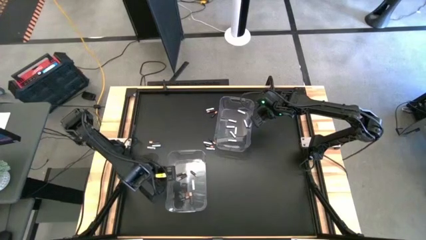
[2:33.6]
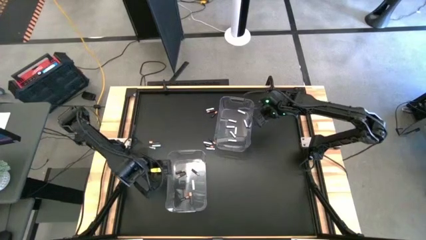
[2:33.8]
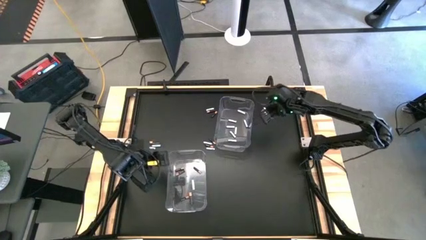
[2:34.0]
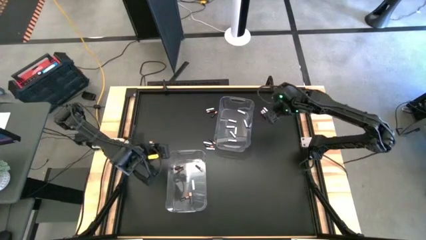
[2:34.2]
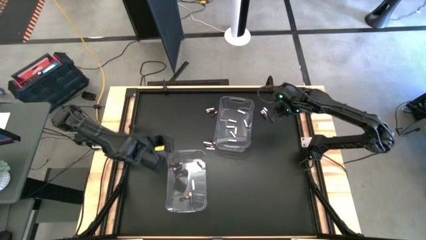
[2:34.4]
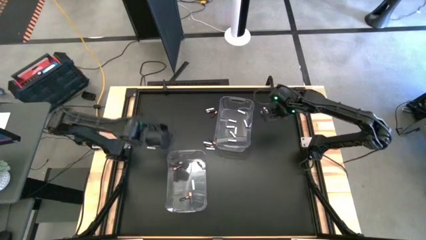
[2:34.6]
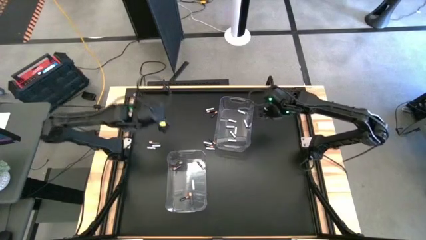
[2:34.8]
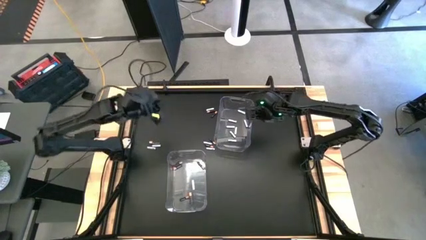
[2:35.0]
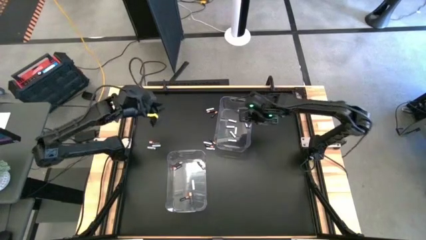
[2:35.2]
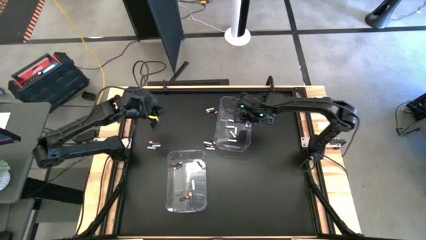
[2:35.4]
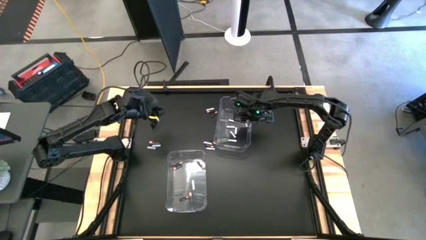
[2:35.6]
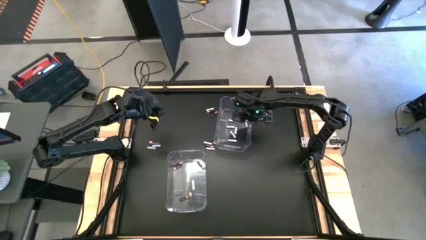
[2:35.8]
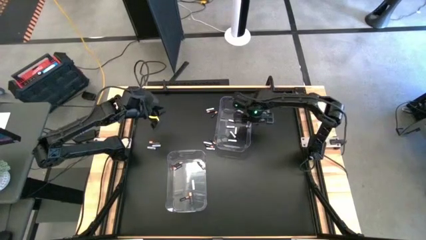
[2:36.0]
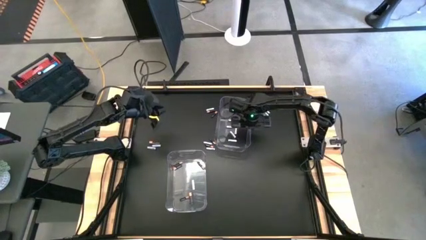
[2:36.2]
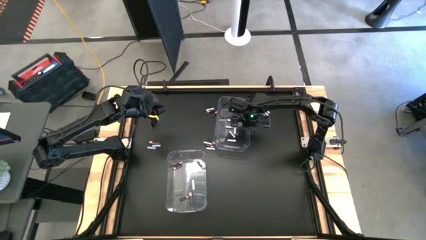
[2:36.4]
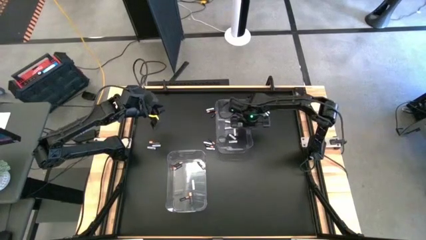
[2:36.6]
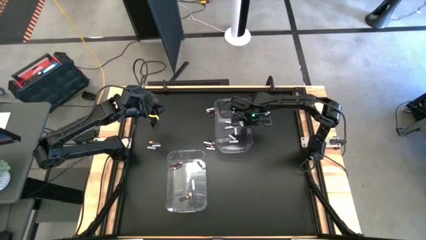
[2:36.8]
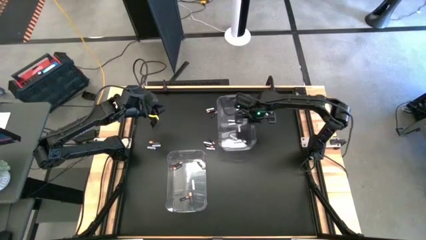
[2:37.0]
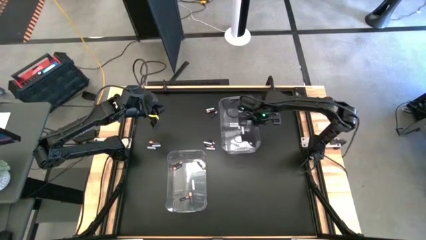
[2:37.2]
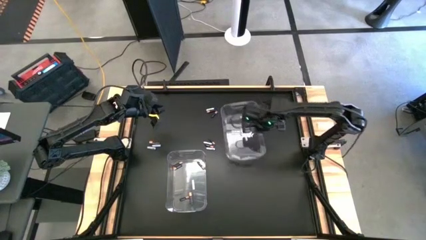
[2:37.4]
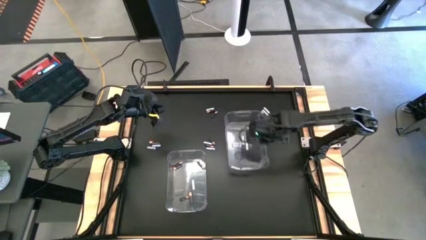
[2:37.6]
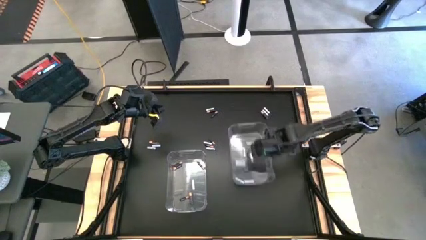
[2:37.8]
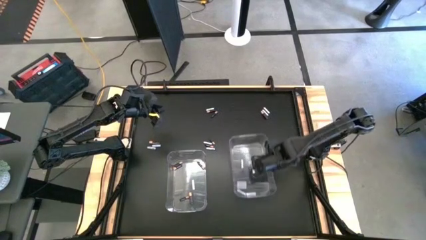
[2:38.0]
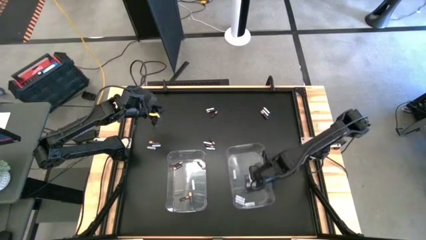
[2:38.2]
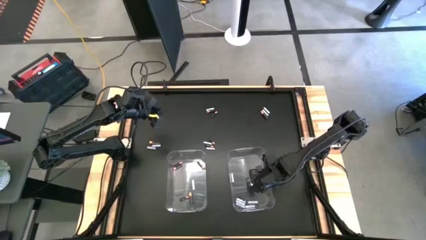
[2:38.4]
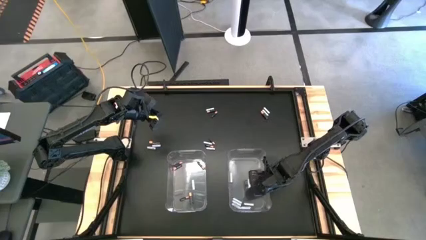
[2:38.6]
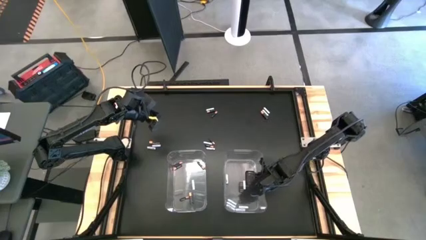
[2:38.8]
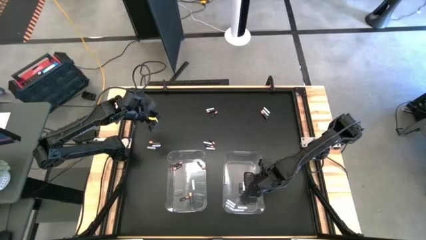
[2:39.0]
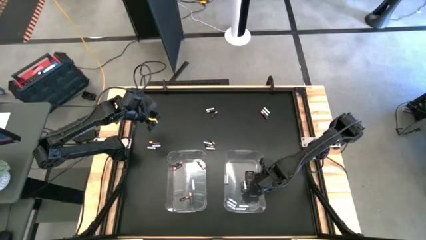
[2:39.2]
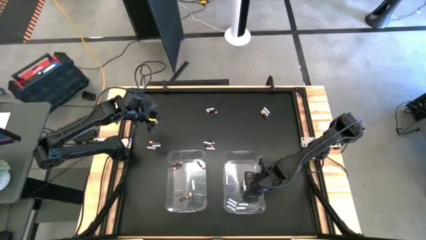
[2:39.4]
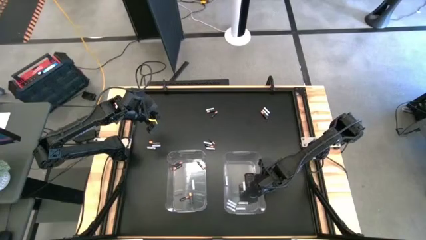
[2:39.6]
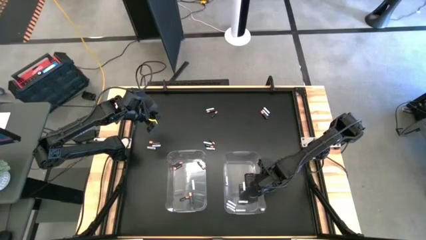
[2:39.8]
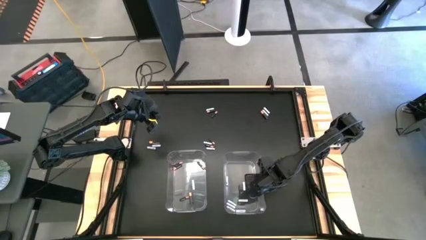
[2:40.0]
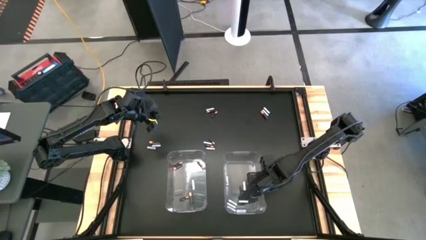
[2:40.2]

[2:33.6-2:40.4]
Task: Sort batteries
Move the top transparent bin to the bottom of the table

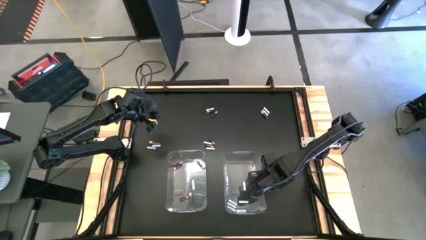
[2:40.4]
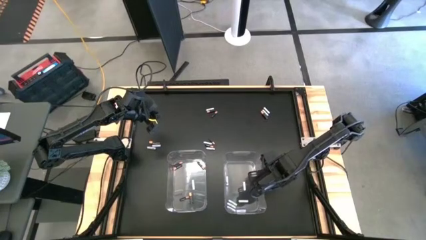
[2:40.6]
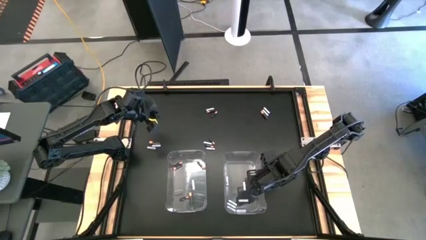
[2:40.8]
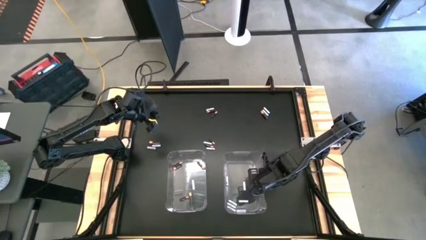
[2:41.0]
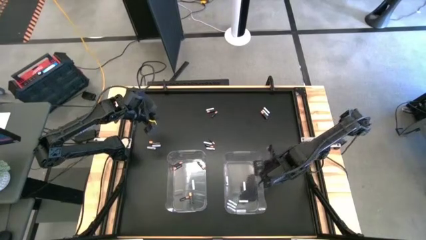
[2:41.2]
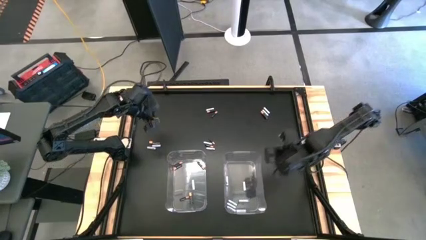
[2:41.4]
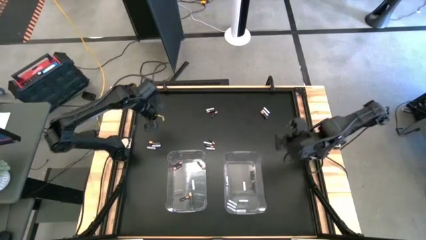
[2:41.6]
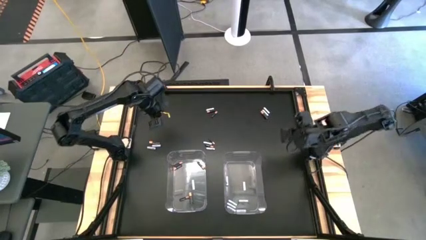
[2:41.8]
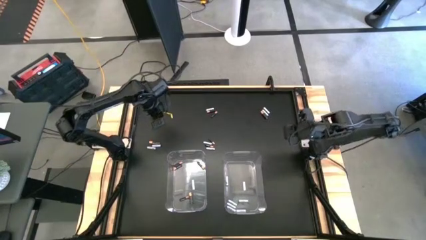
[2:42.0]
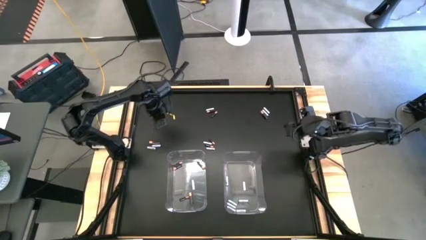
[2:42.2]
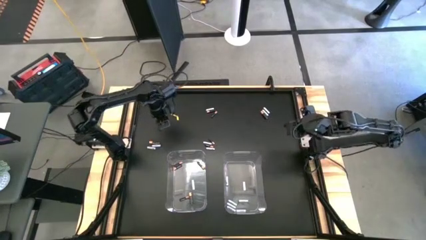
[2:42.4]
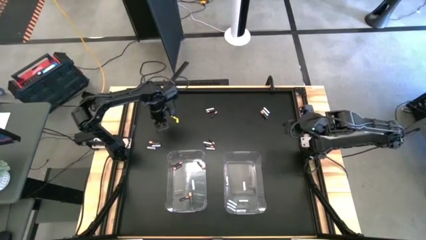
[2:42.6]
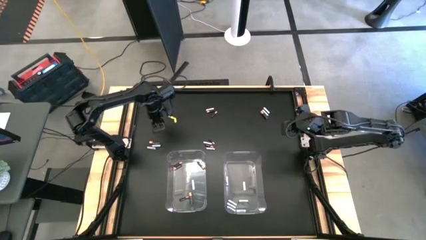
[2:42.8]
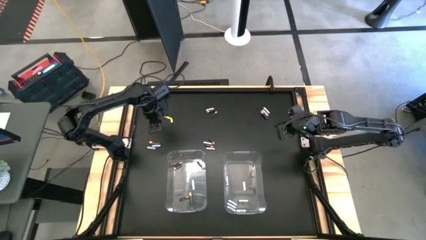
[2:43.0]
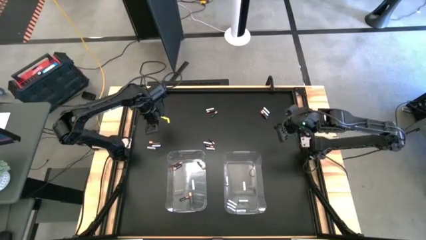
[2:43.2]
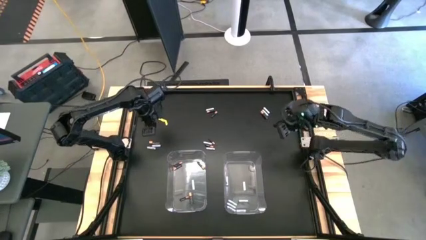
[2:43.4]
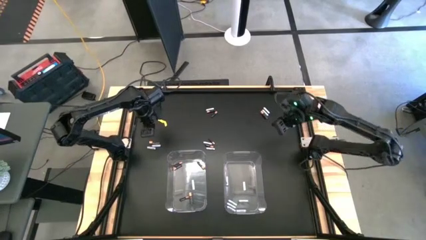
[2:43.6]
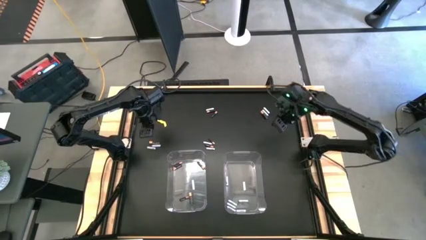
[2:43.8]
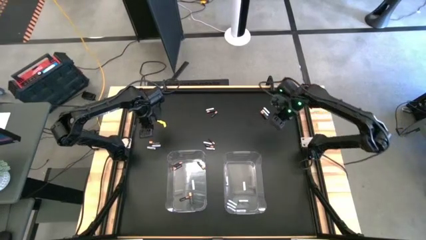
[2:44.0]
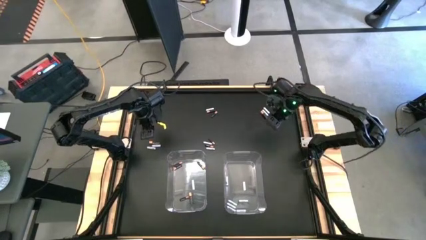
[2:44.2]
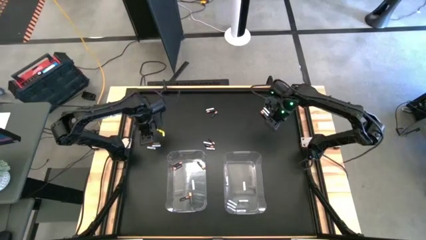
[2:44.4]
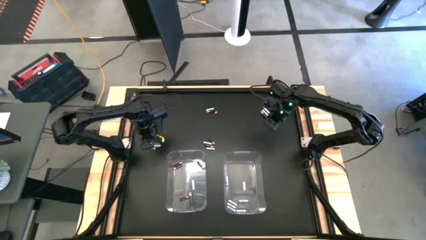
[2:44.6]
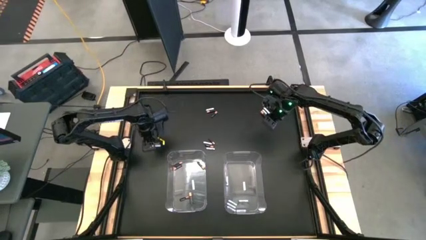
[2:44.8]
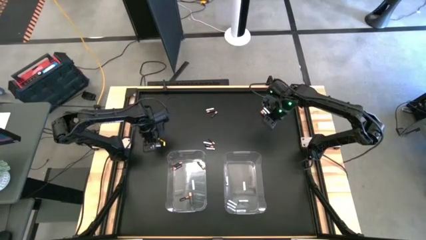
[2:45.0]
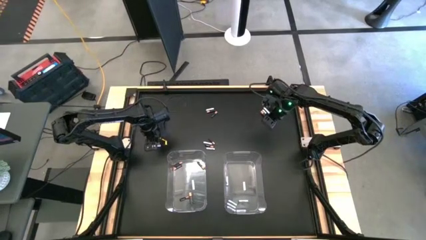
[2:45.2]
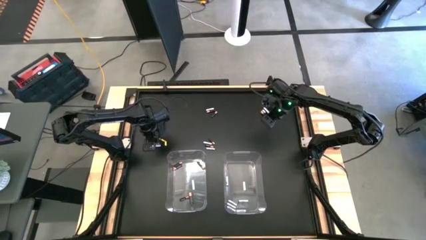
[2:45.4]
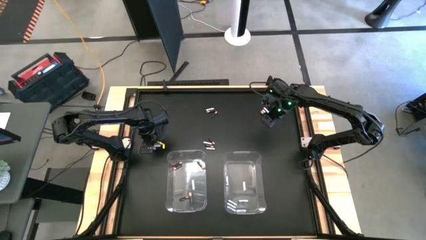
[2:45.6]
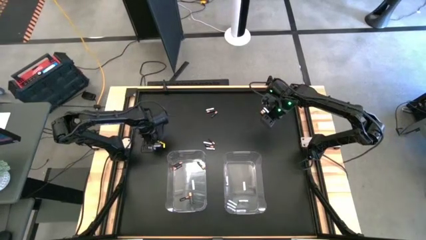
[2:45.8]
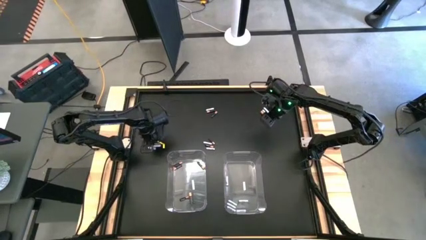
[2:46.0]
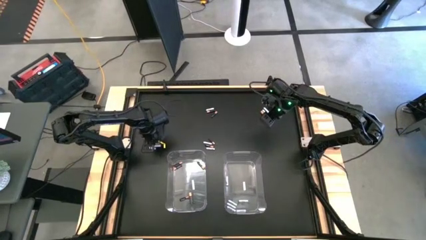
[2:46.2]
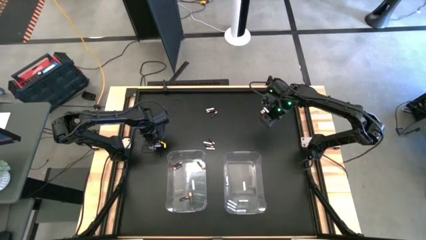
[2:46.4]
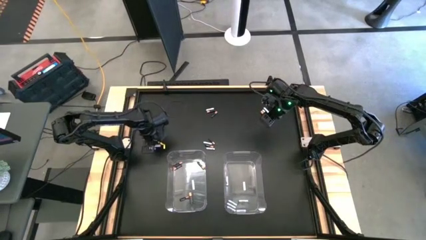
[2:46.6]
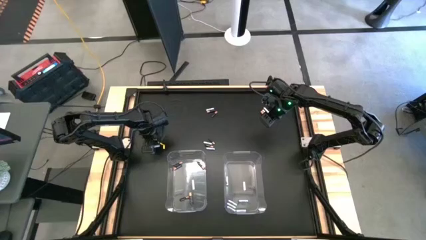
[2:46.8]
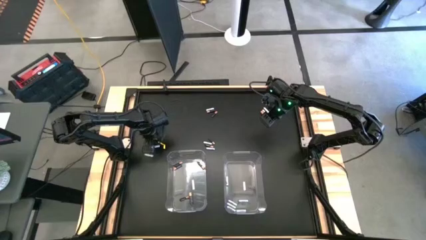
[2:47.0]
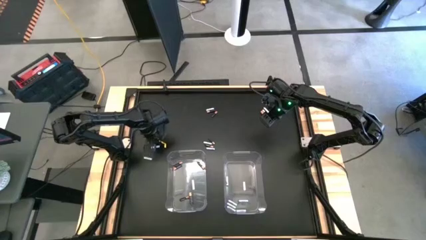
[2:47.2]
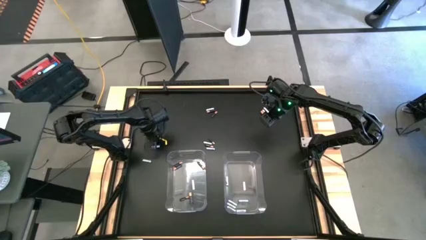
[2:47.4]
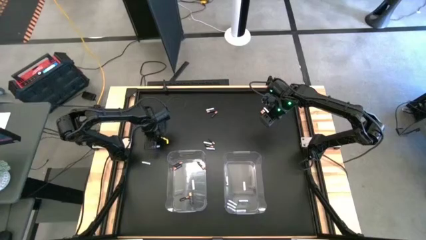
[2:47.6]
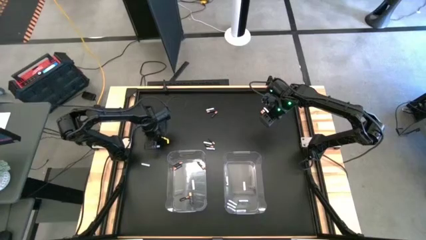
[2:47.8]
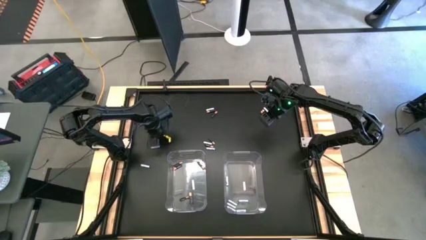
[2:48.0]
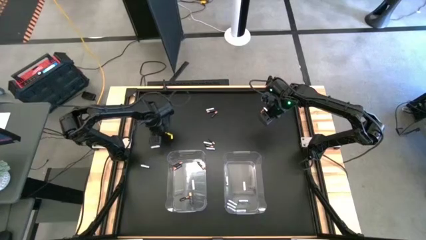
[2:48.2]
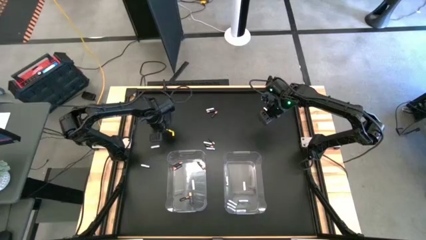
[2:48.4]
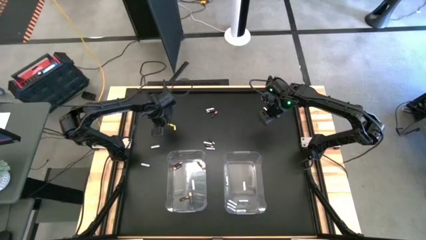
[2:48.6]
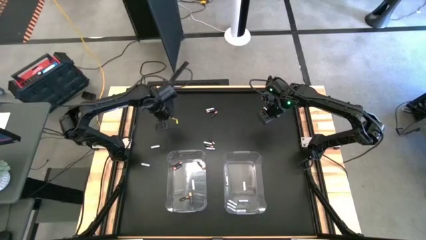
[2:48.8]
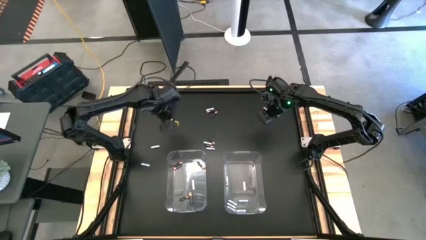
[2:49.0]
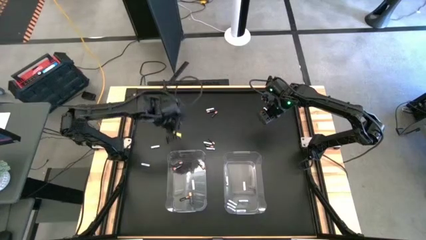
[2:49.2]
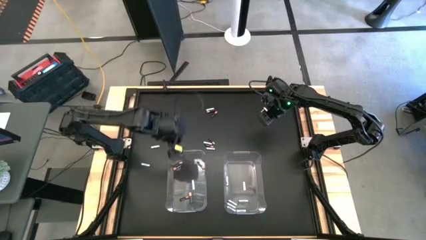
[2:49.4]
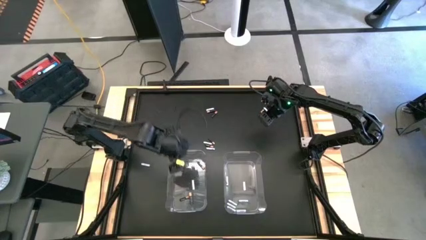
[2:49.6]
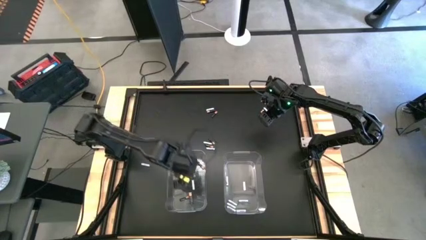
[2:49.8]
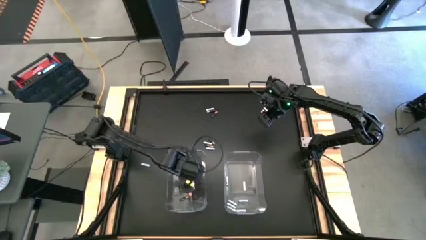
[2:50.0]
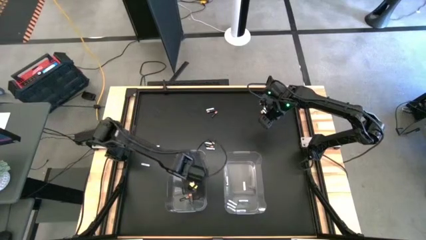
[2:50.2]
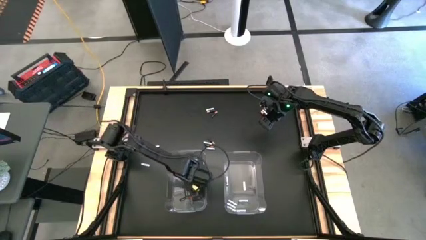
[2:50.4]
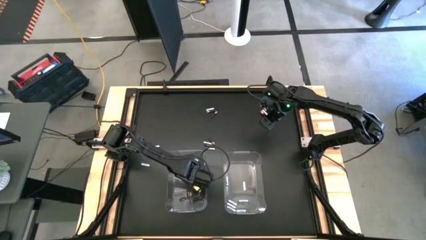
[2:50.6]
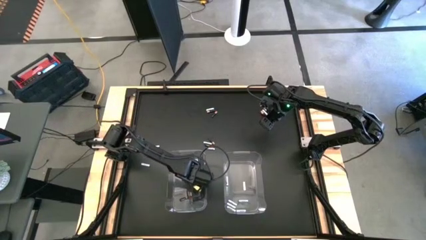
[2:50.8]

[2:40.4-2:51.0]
Put the black battery into the left transparent bin
